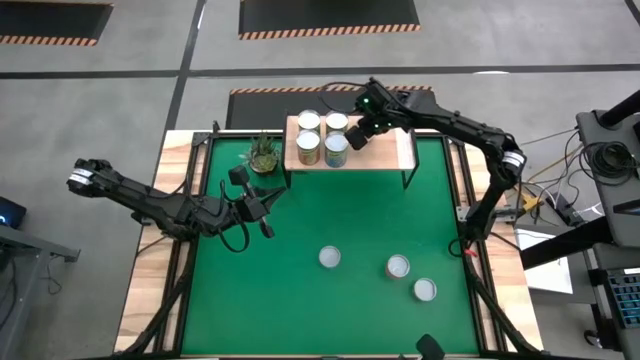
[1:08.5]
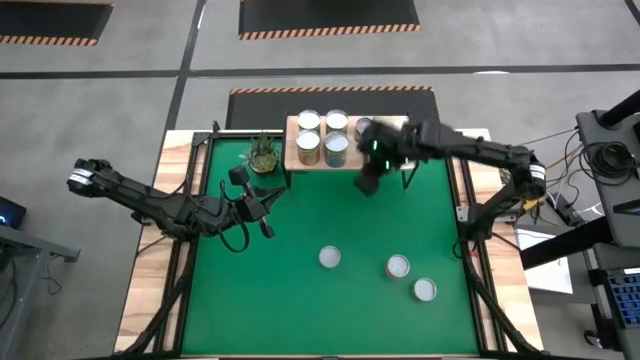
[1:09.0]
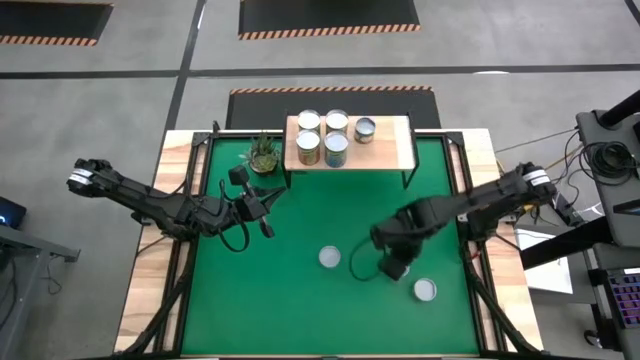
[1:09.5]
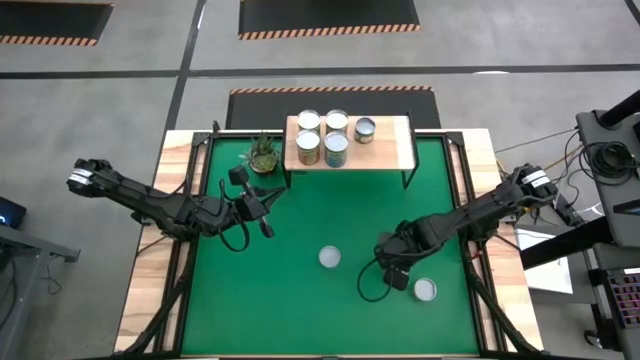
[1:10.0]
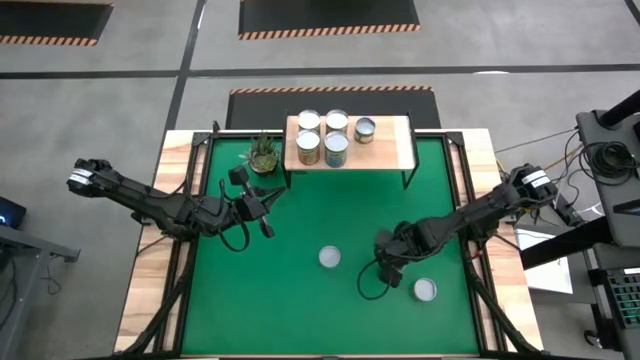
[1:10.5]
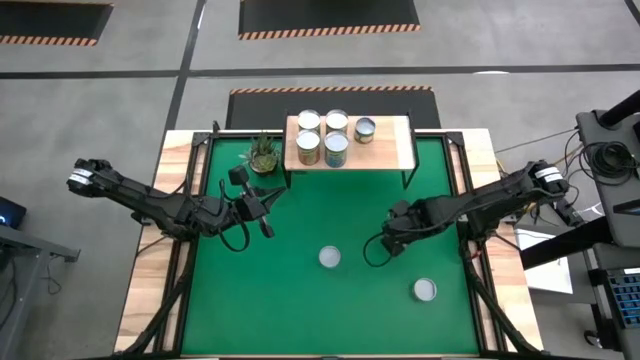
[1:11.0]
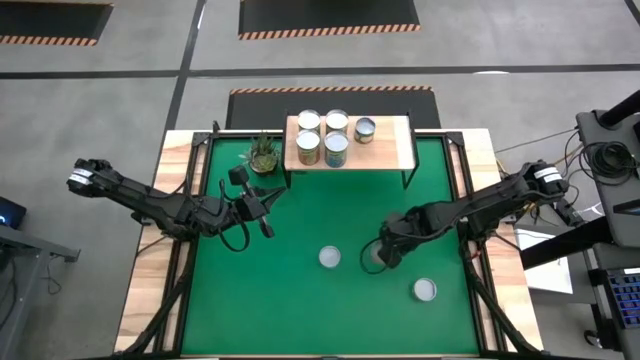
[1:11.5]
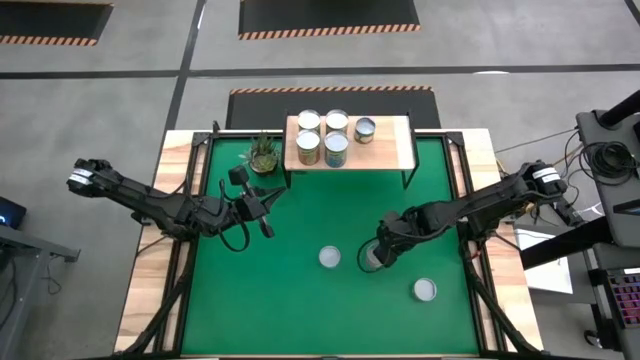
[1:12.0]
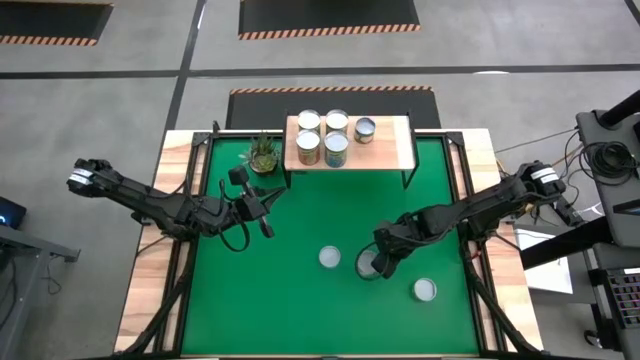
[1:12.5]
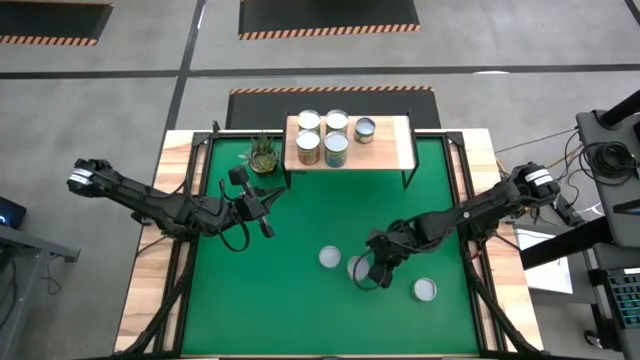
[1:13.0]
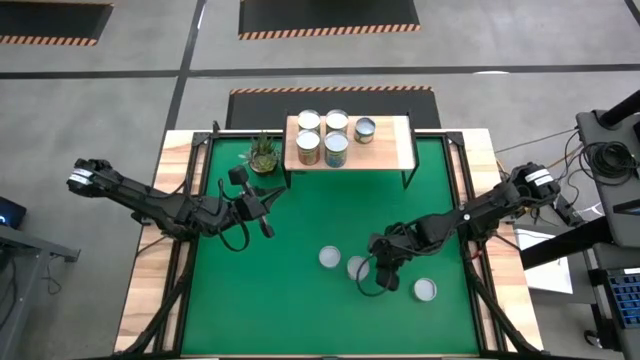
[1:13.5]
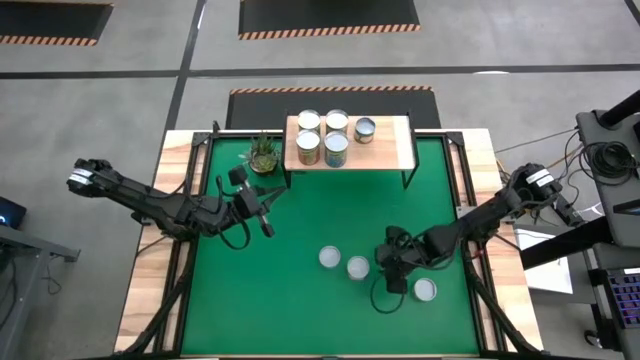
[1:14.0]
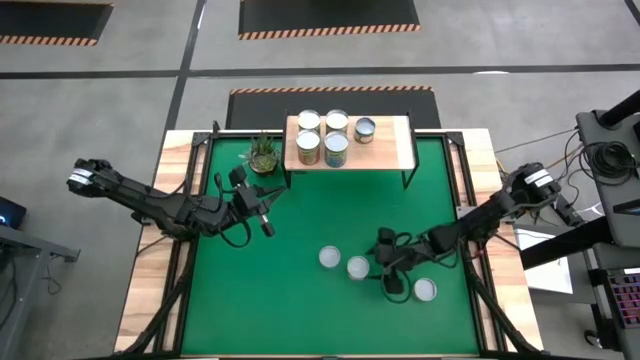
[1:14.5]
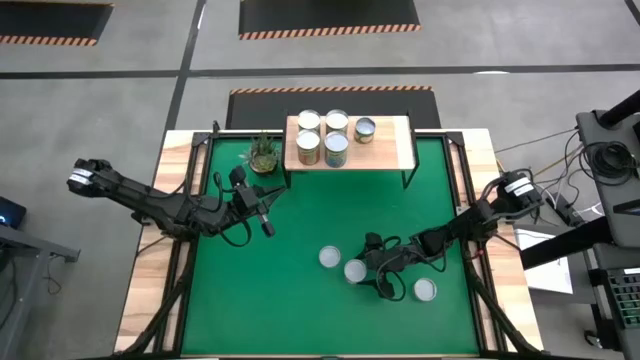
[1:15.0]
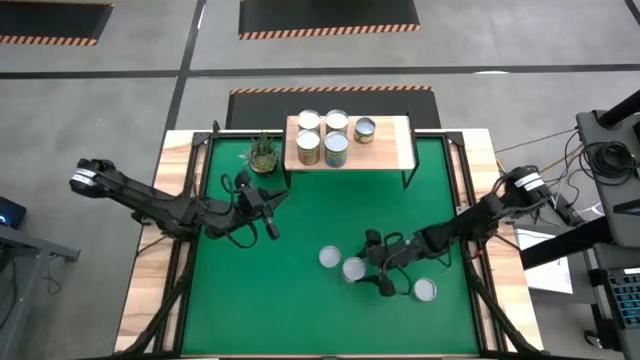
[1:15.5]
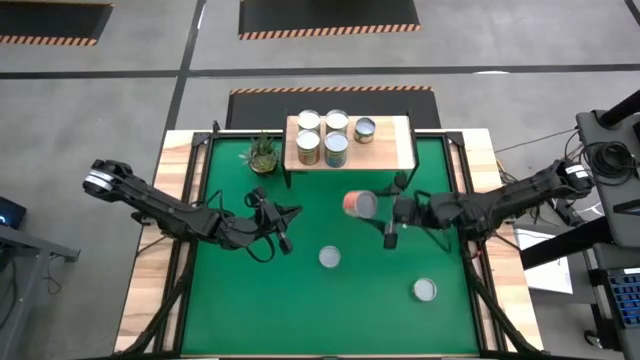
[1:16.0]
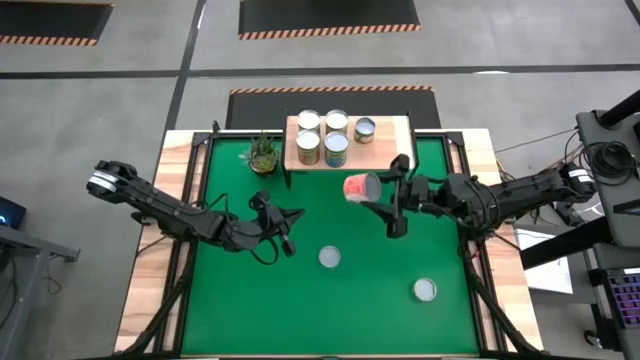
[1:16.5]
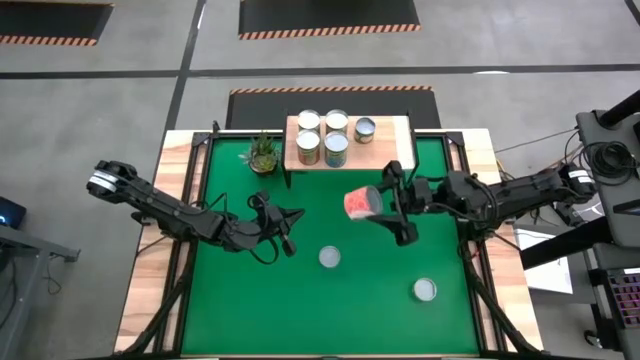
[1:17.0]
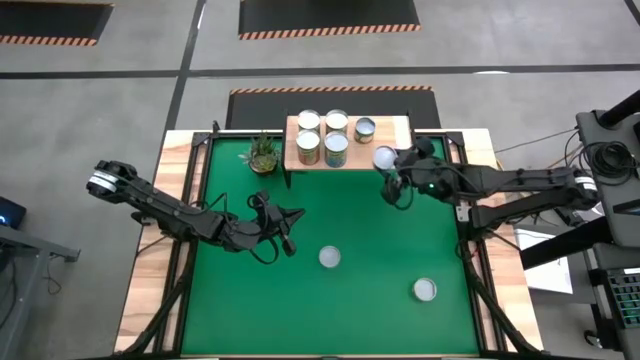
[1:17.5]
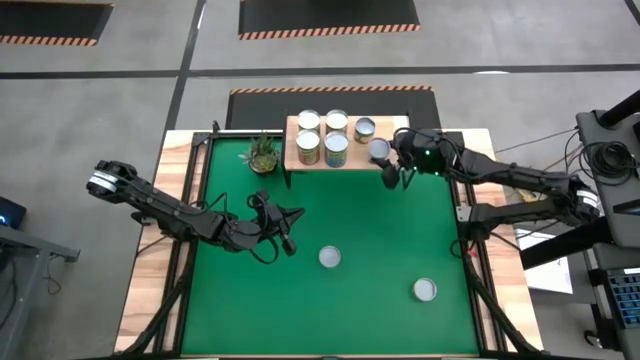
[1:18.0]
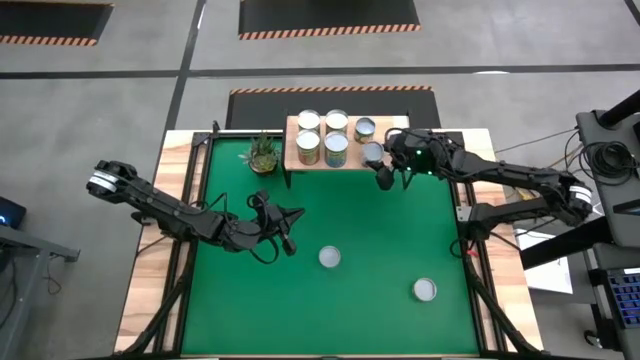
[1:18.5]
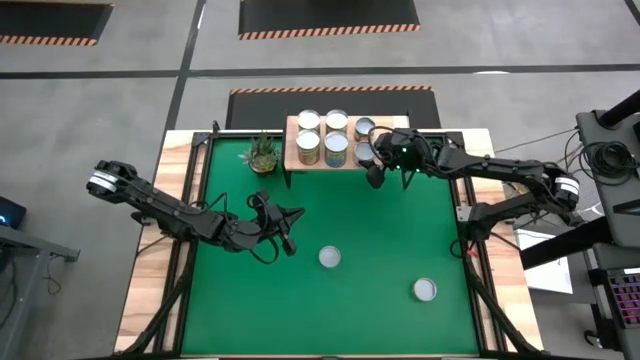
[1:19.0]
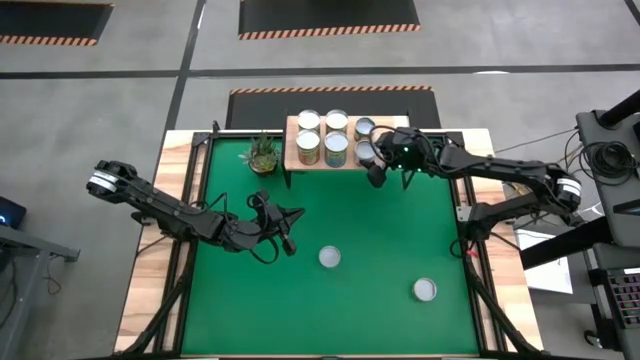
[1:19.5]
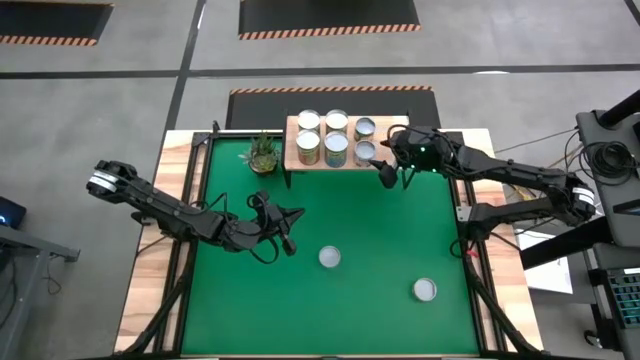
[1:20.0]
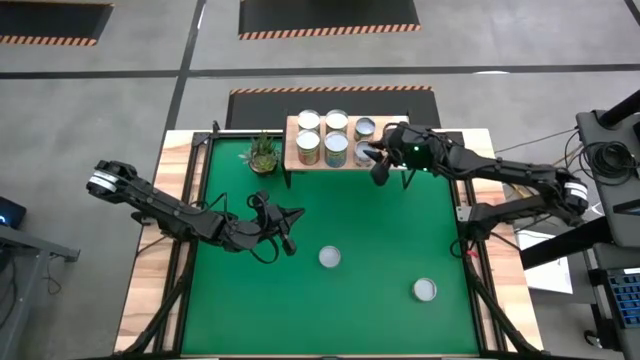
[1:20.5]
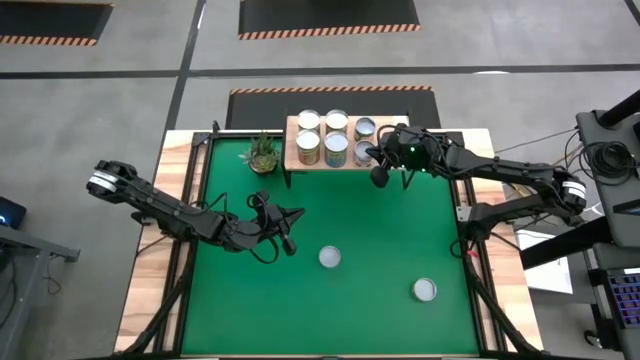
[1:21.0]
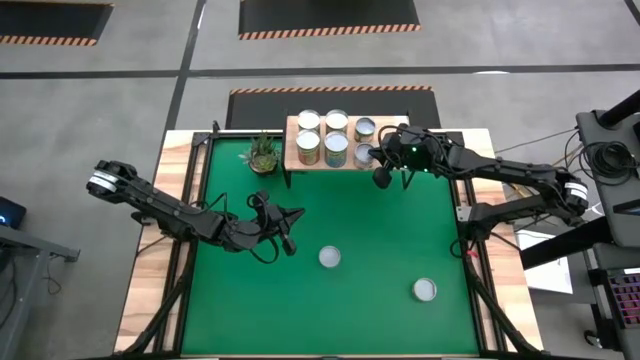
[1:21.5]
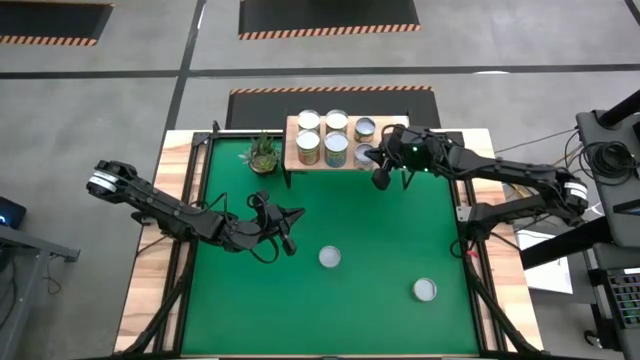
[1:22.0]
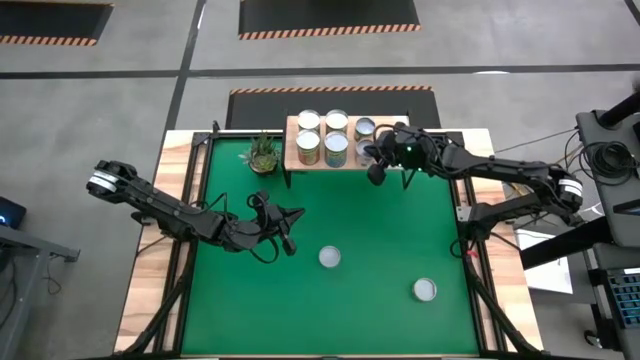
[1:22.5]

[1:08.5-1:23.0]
Task: Pick and place cans onto a shelf
Put the canned meatball sauce on the shelf

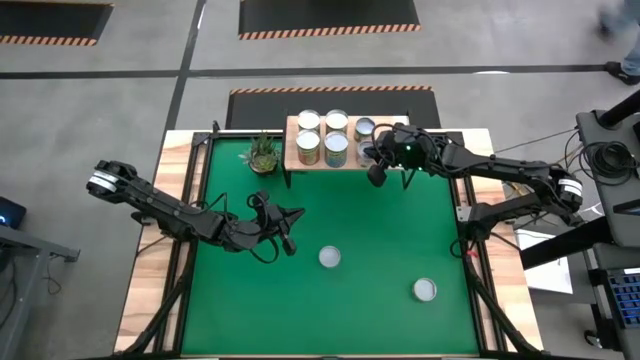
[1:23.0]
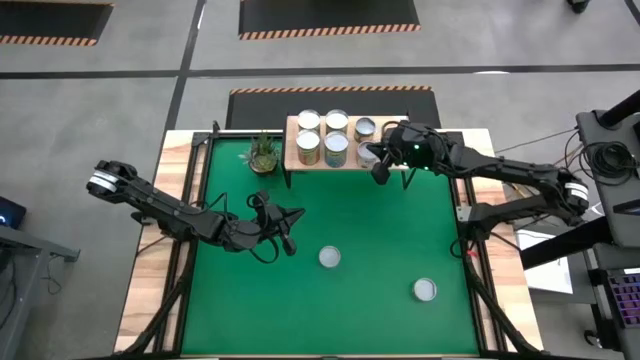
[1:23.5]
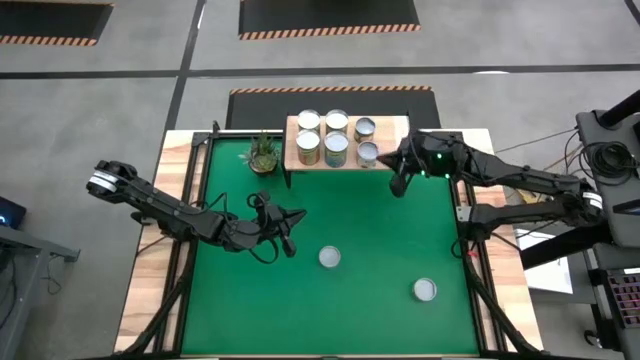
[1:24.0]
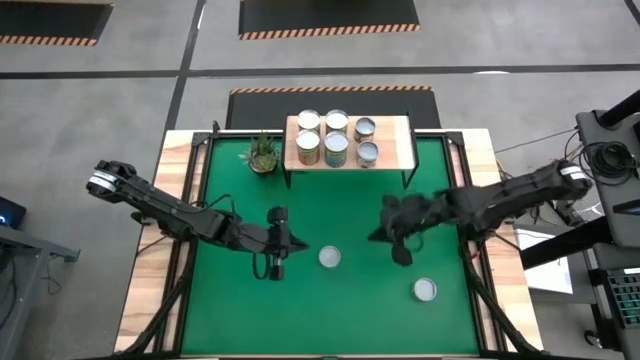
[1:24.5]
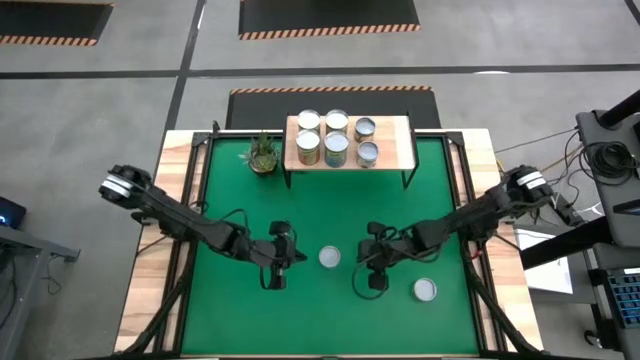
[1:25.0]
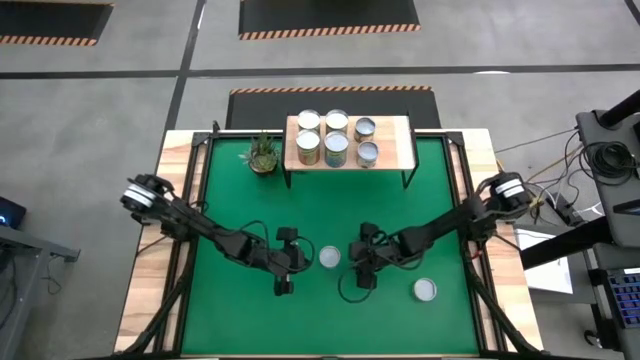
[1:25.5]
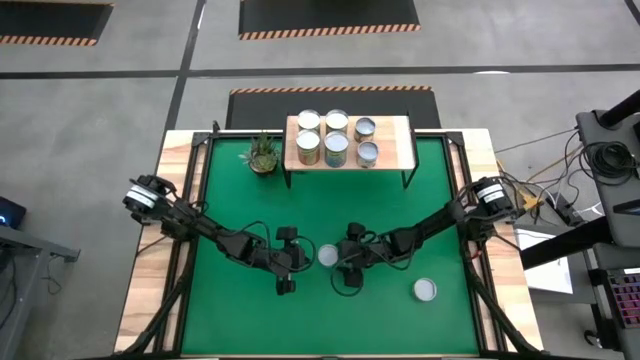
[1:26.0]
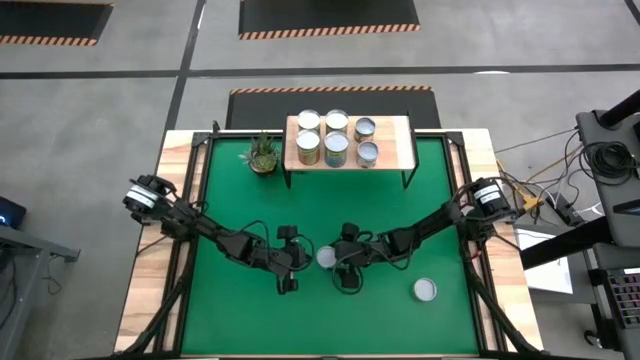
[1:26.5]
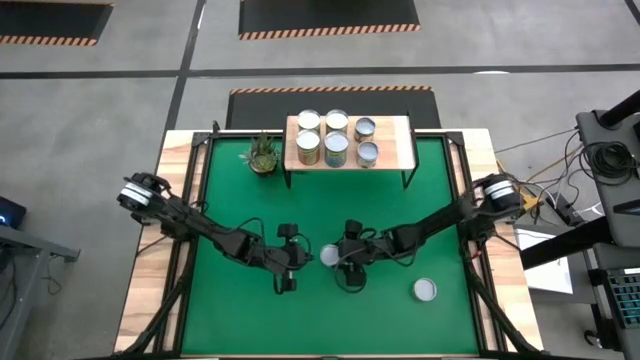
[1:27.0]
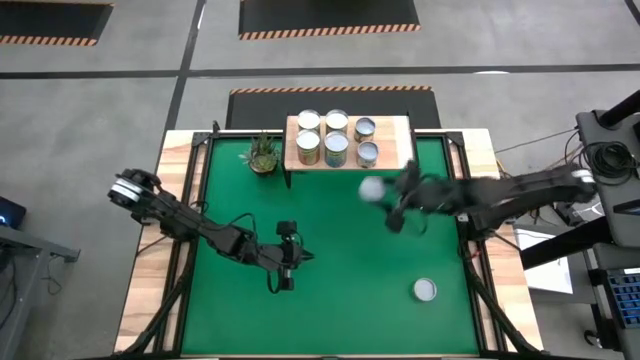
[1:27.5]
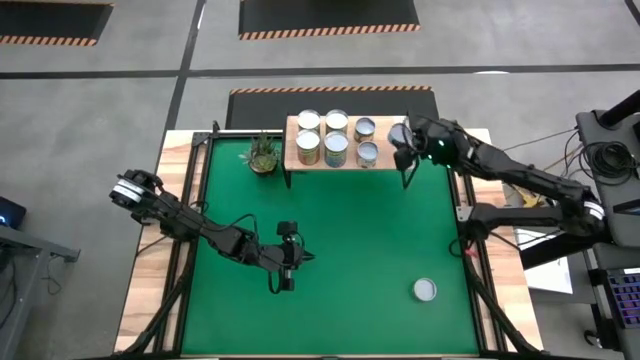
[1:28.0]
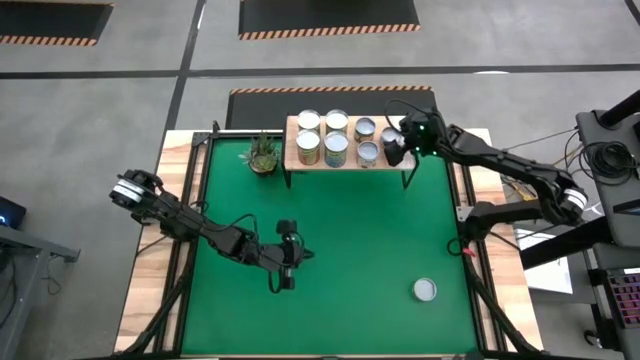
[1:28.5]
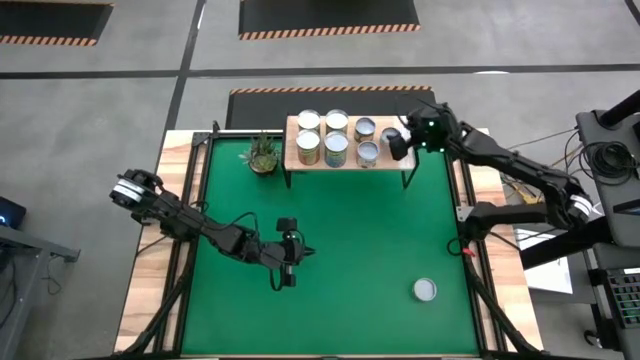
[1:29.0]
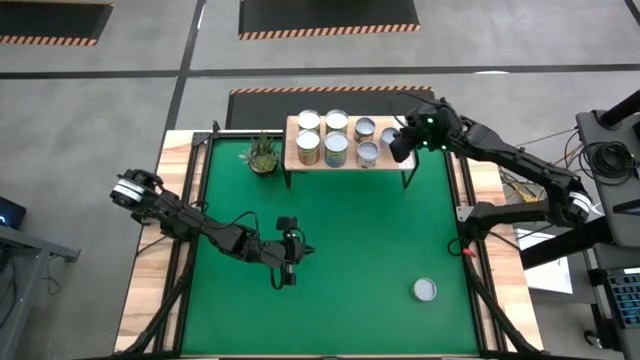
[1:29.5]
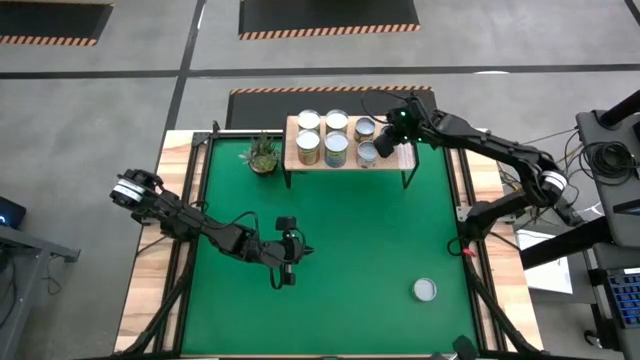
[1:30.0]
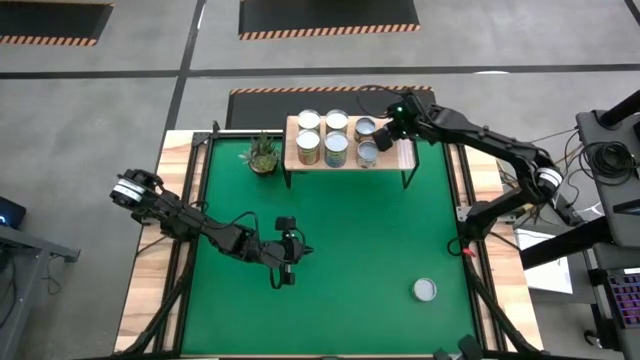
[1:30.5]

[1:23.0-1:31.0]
Put the canned tuna on the shelf
